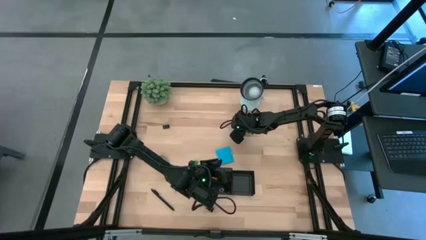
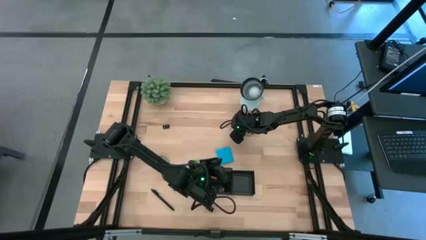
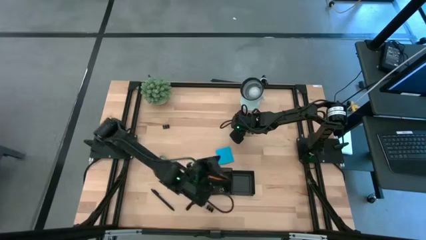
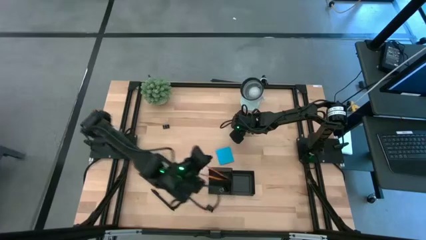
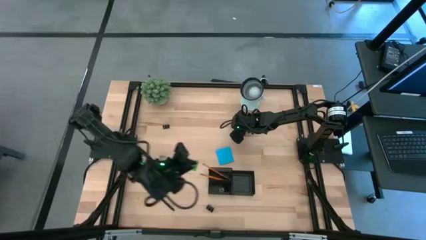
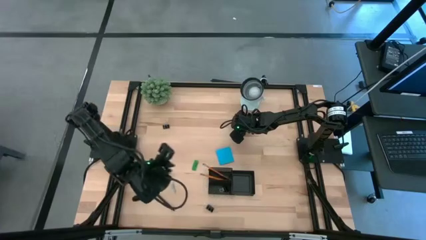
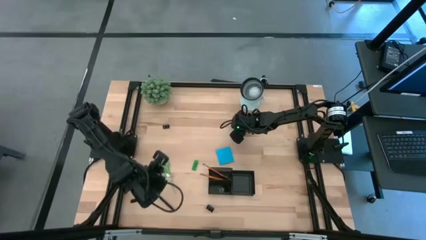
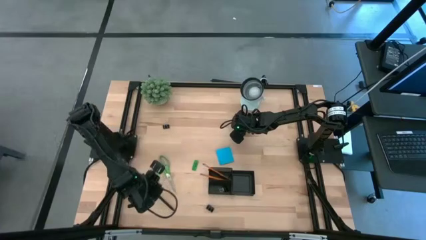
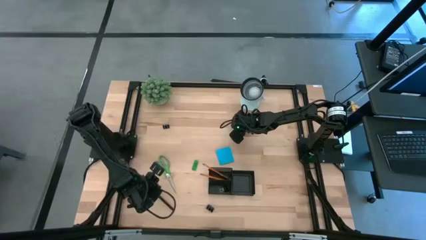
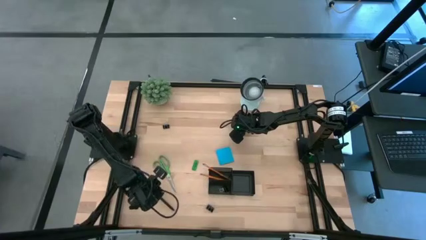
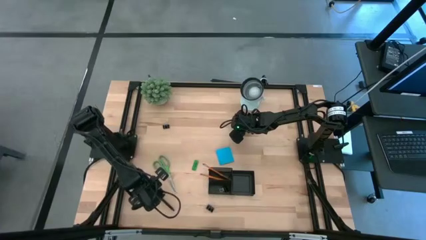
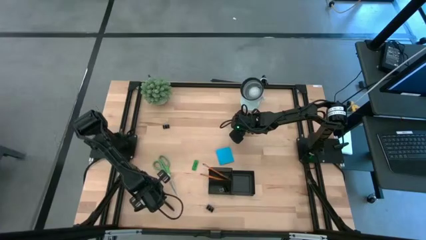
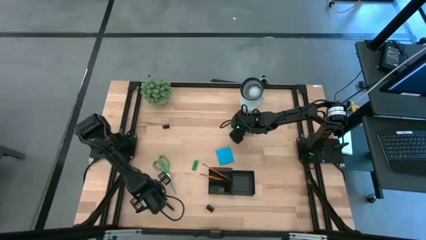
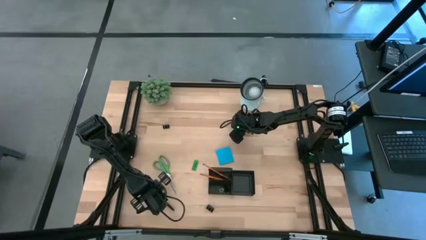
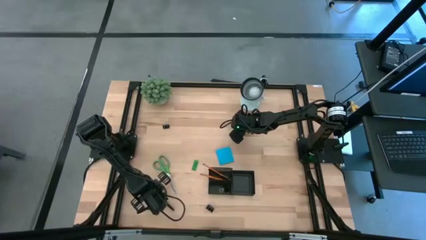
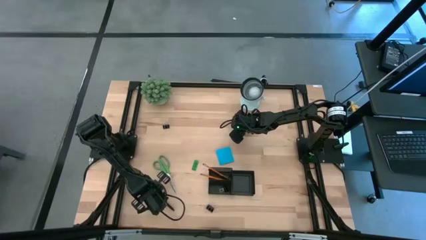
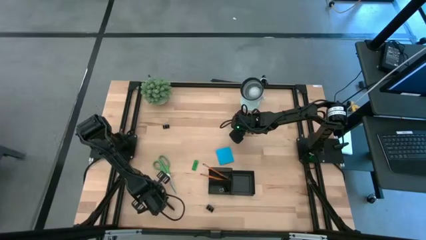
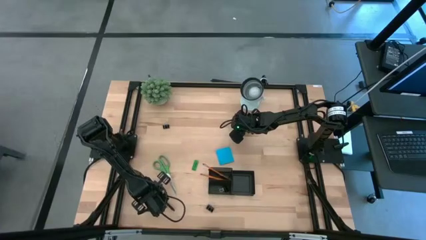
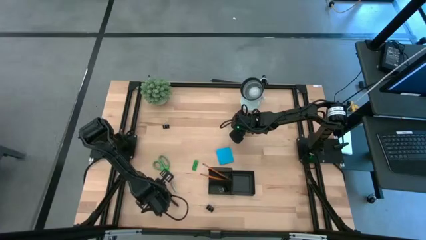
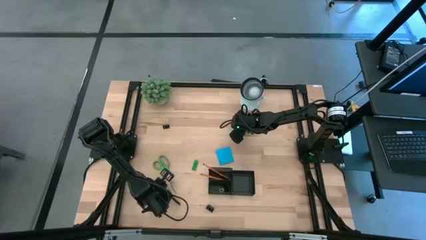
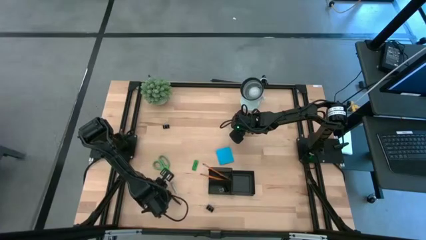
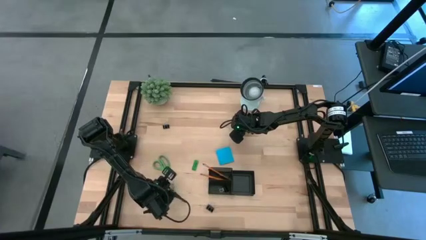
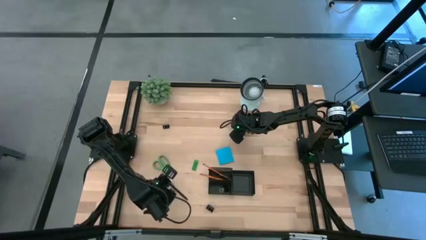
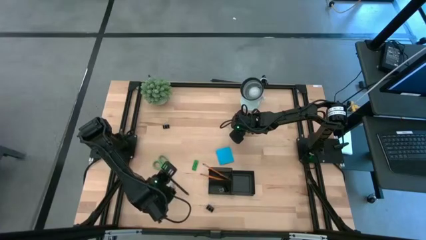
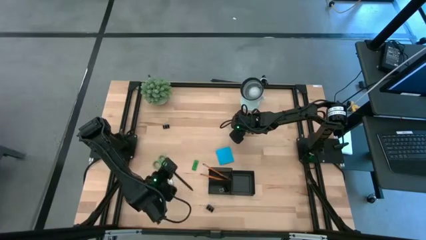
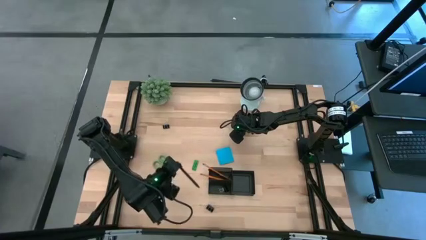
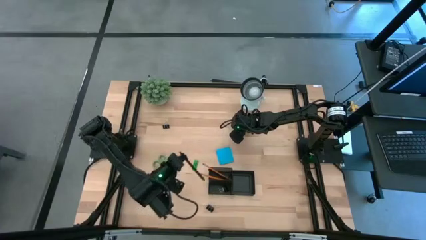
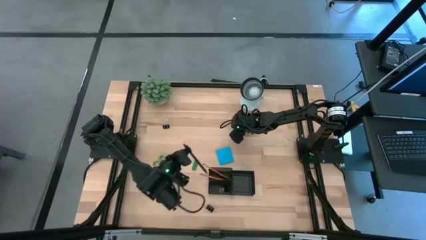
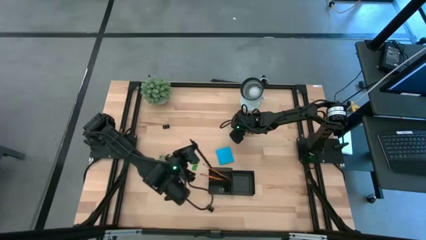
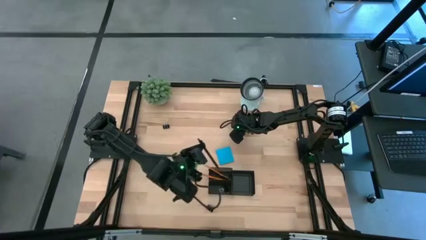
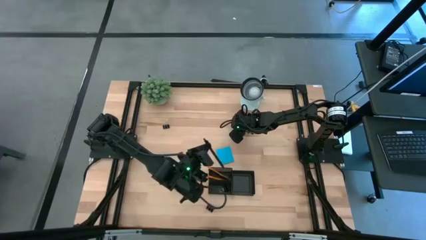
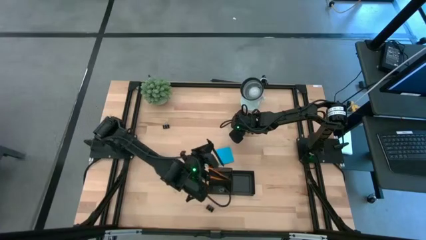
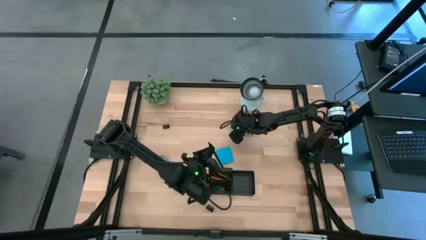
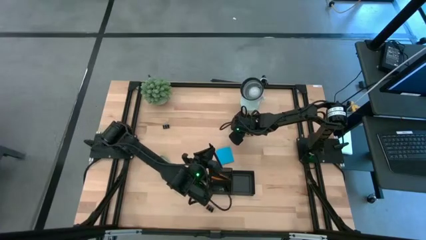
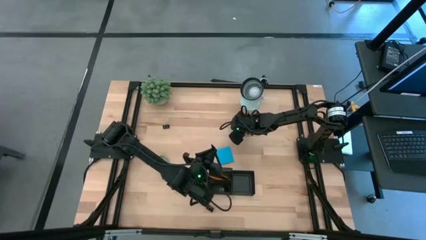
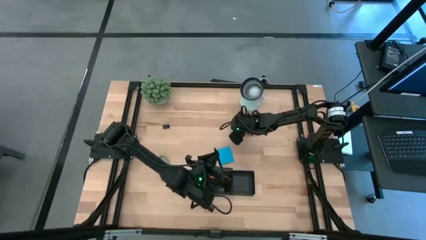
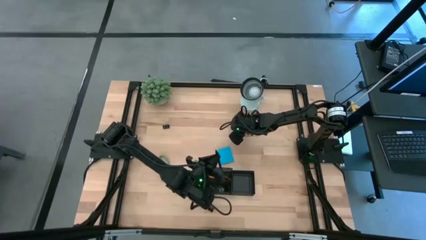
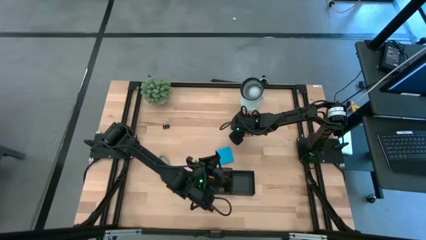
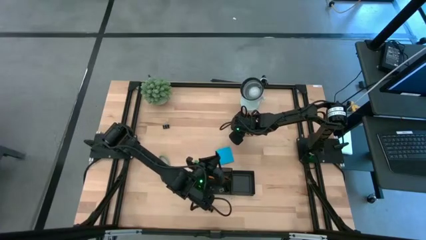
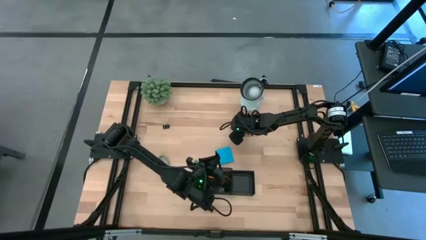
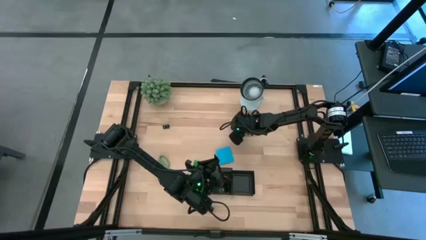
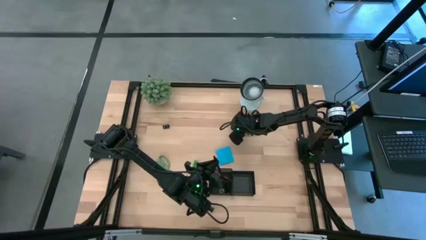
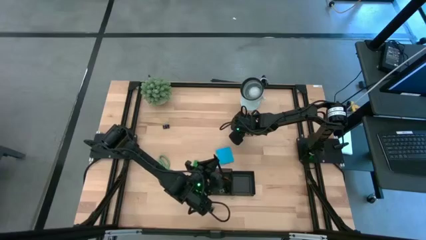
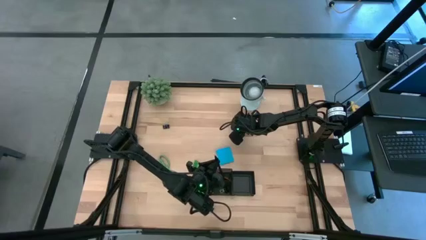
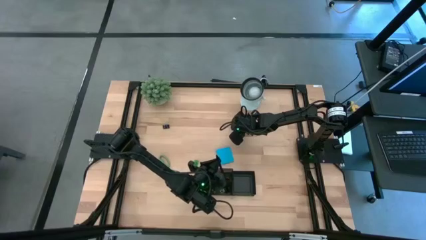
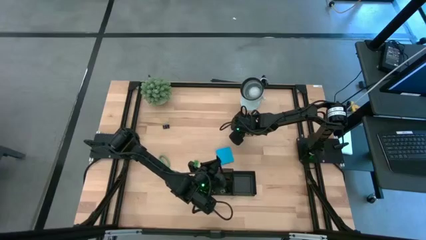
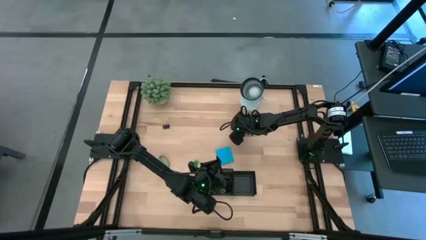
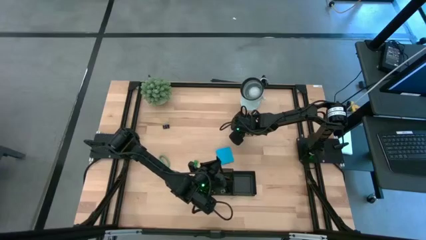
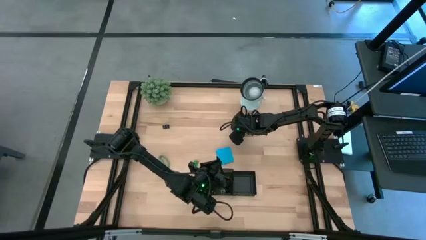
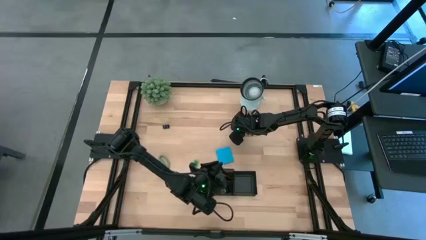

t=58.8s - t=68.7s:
Task: Pick and place office supplies into organizer
Put the bottom pen into the top left slot of the desk organizer

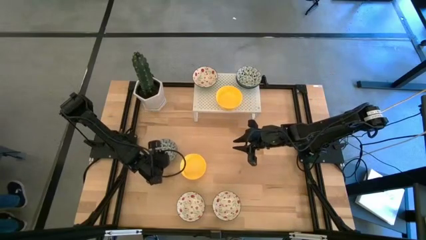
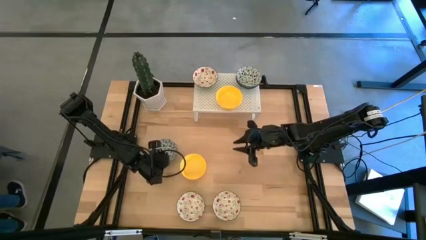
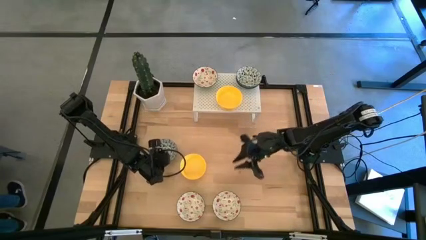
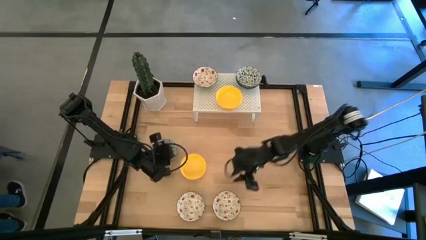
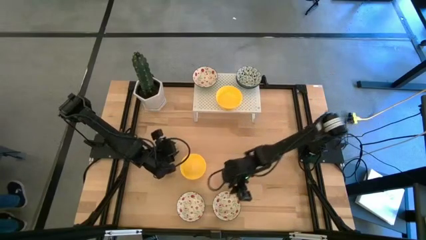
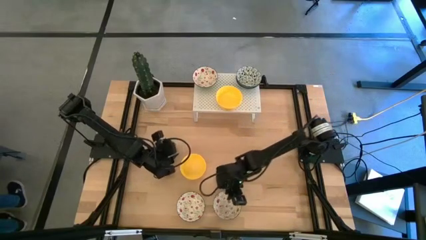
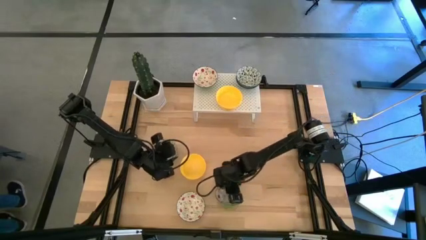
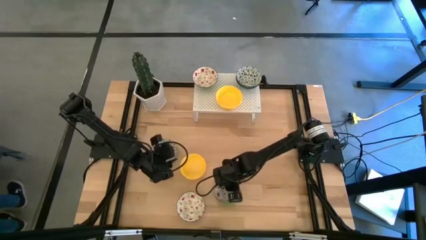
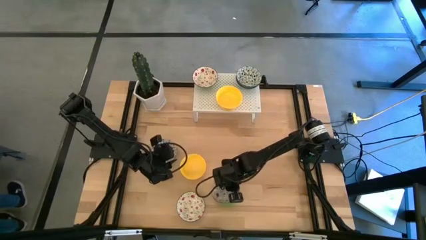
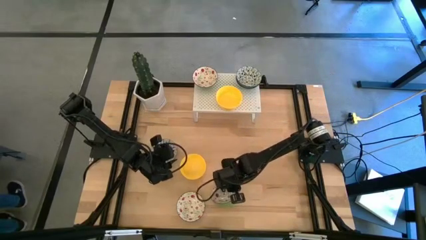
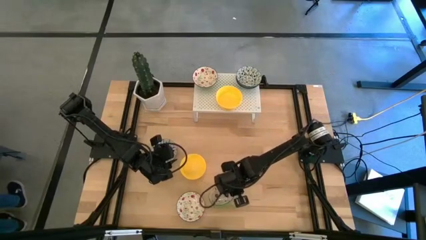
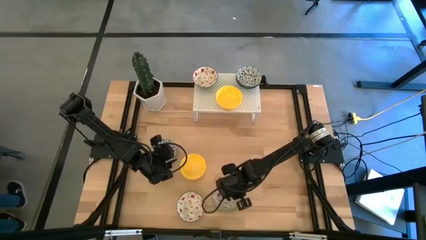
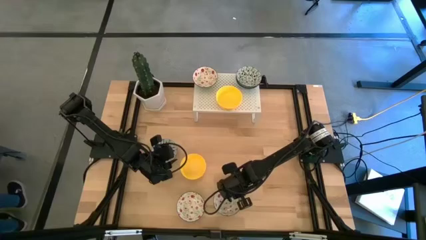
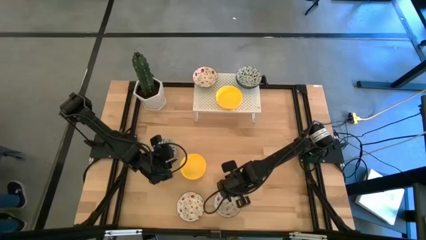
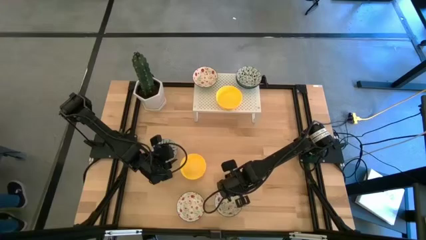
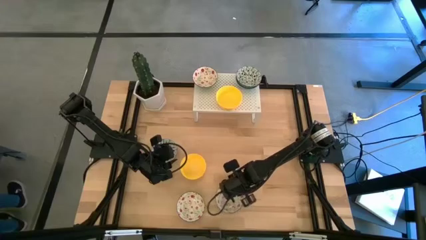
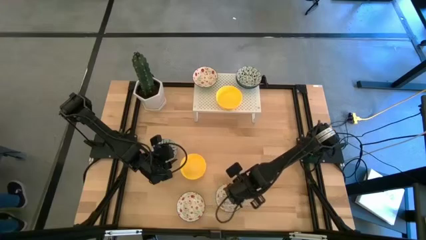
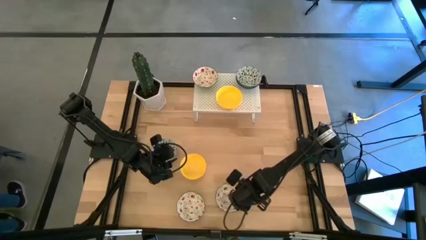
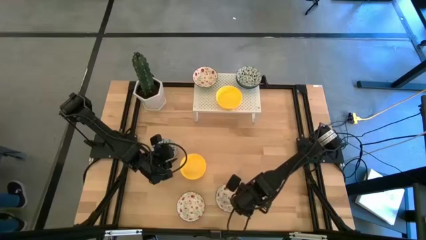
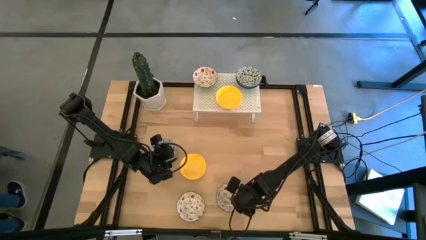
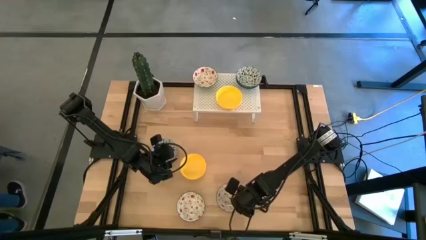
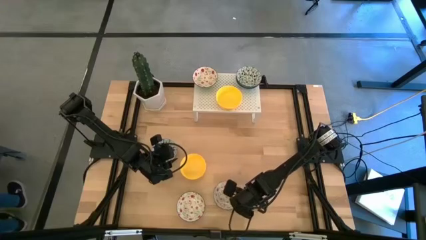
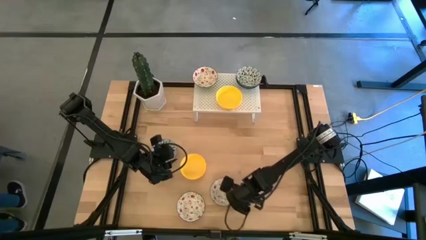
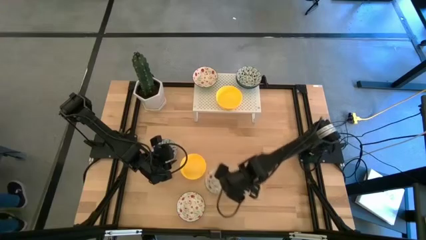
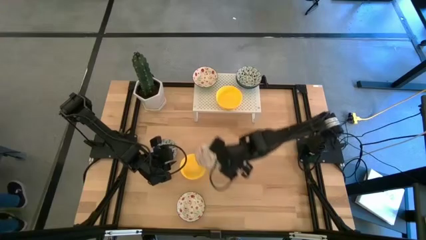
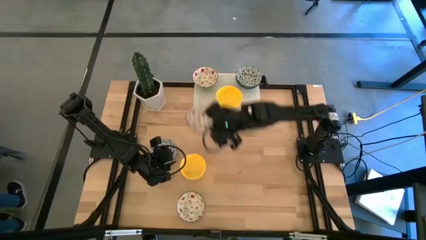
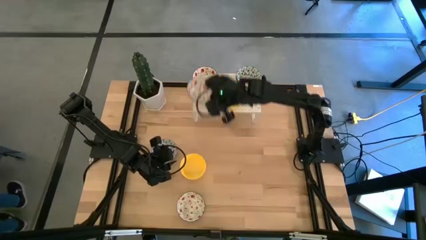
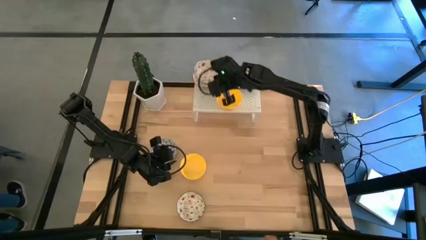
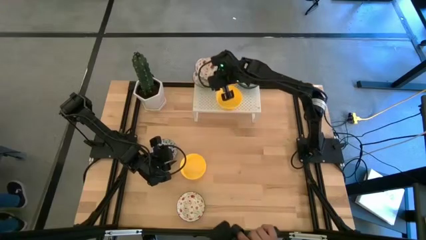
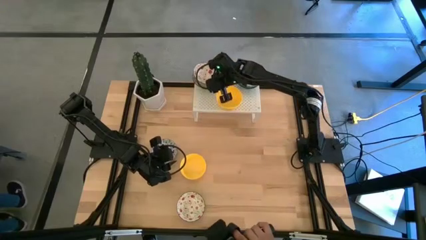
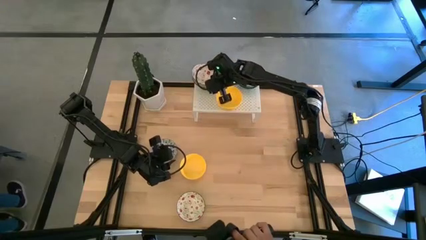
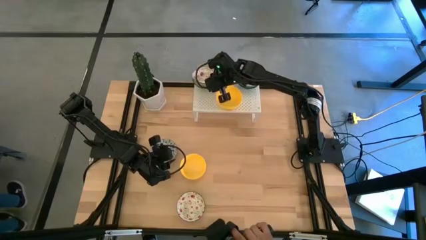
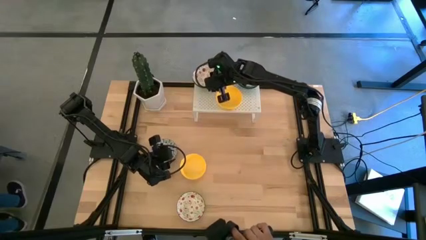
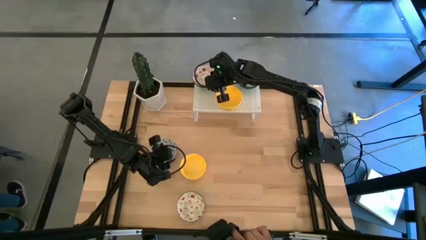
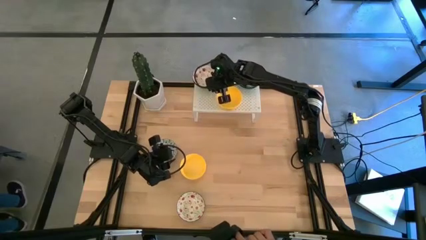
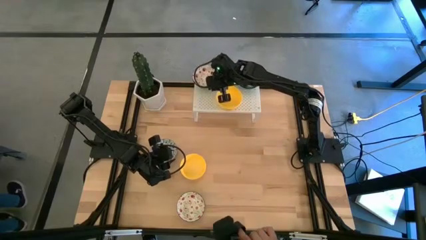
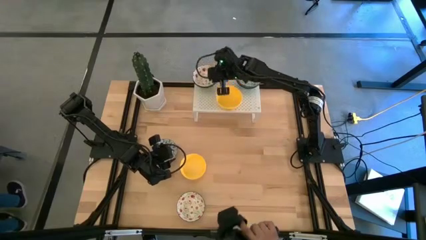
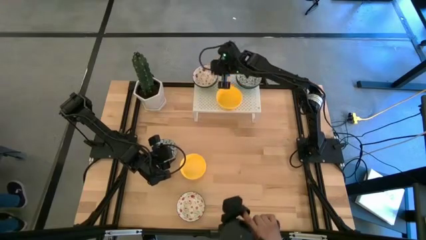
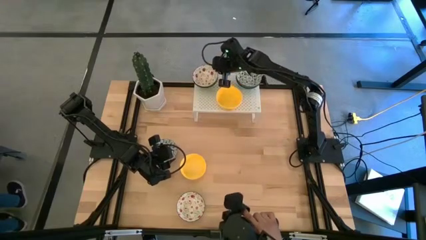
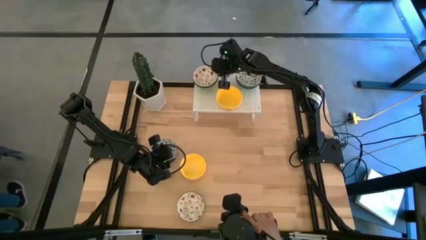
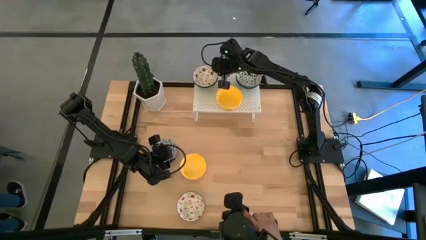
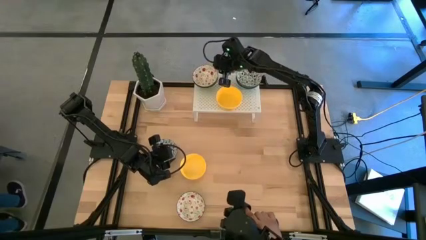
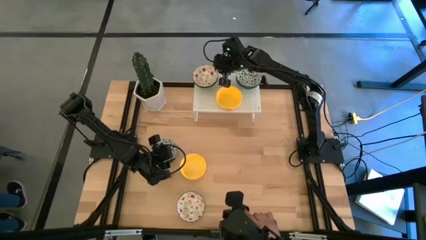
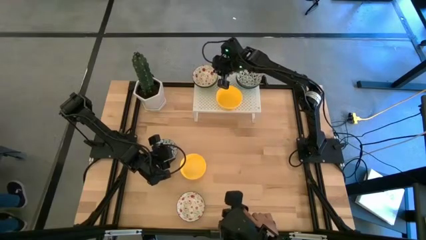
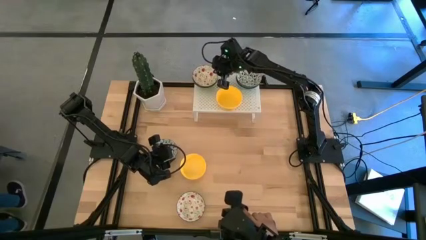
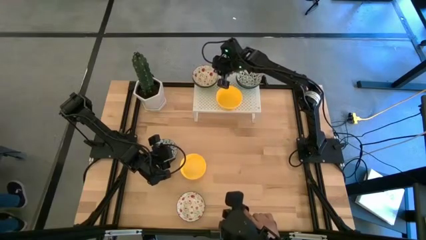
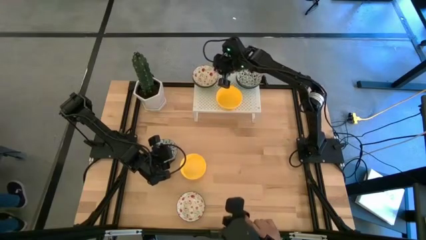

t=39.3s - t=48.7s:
Task: Pick & Place Mini bowls
Stack the right green patterned bowl on top of the other green patterned bowl on the shelf
